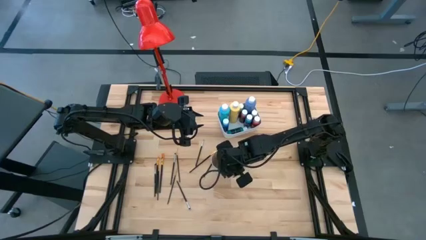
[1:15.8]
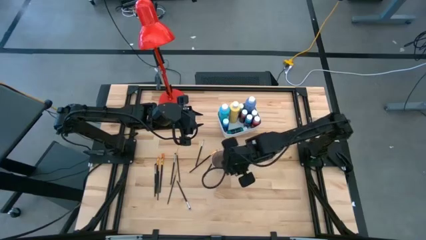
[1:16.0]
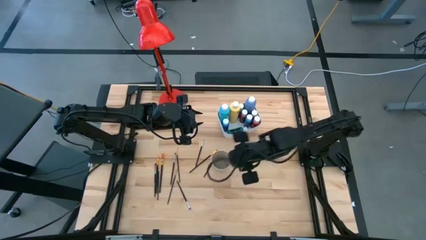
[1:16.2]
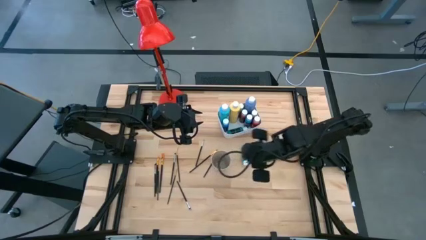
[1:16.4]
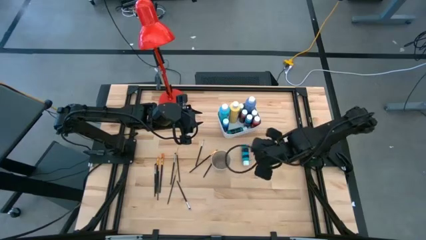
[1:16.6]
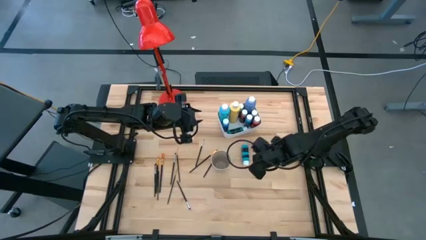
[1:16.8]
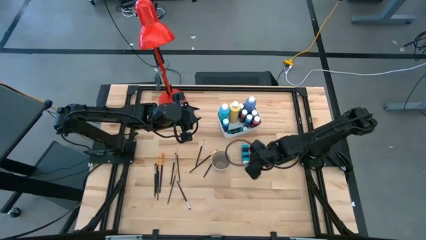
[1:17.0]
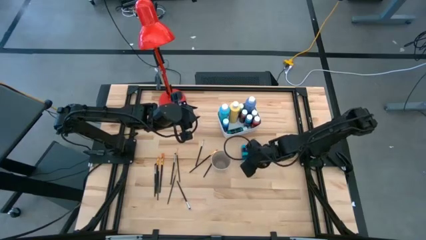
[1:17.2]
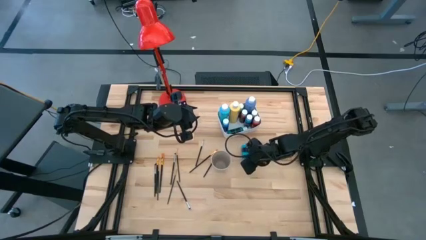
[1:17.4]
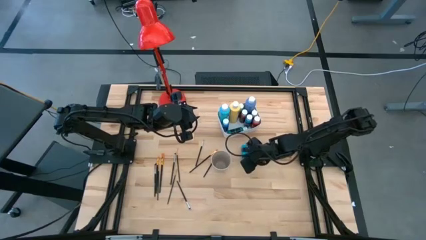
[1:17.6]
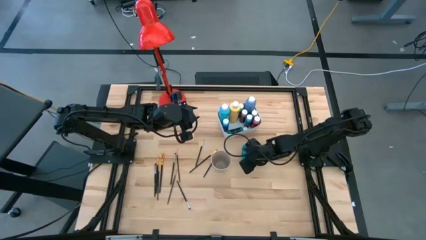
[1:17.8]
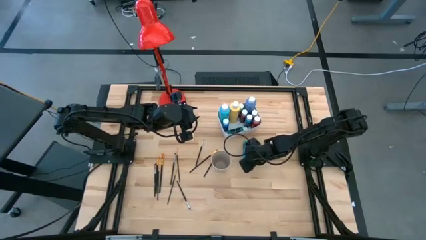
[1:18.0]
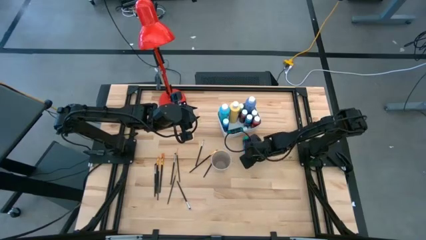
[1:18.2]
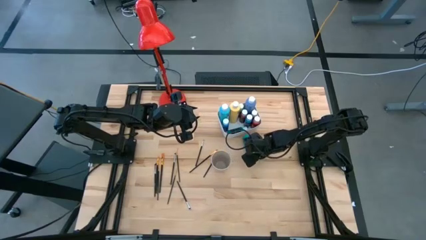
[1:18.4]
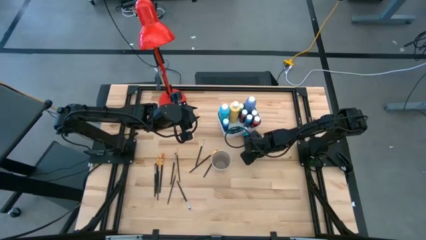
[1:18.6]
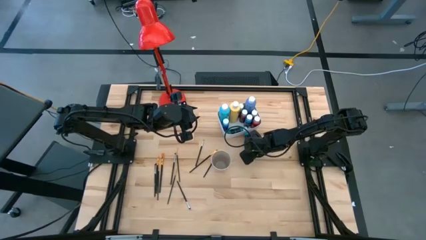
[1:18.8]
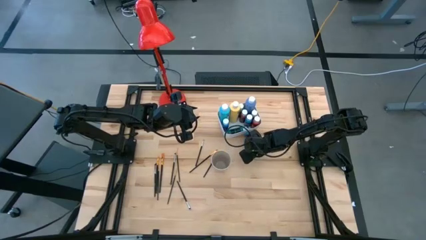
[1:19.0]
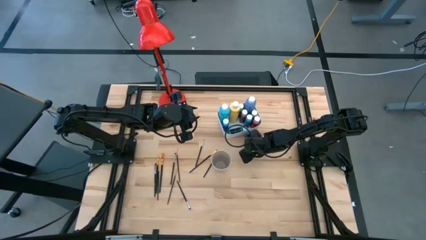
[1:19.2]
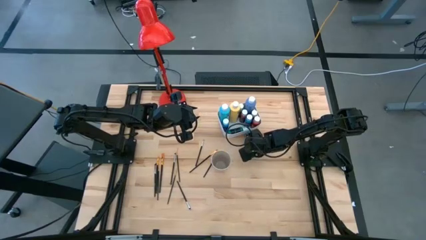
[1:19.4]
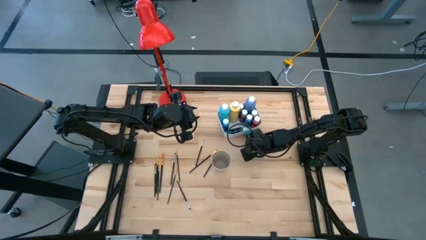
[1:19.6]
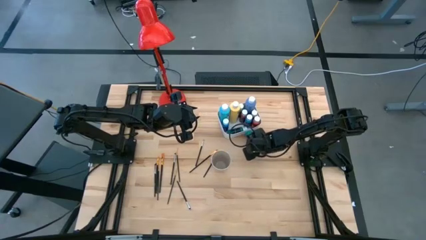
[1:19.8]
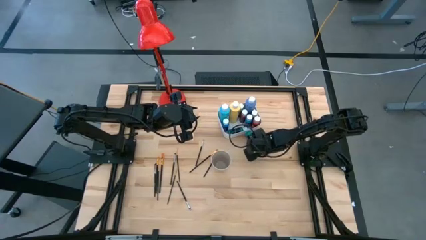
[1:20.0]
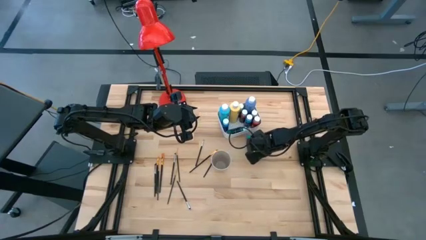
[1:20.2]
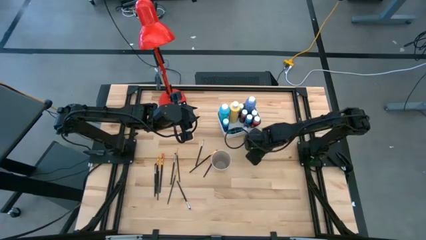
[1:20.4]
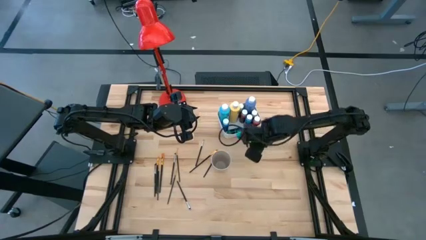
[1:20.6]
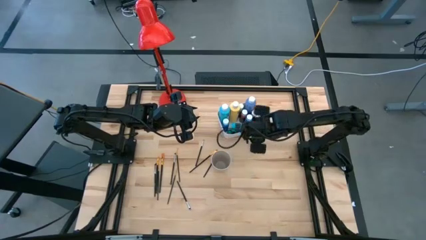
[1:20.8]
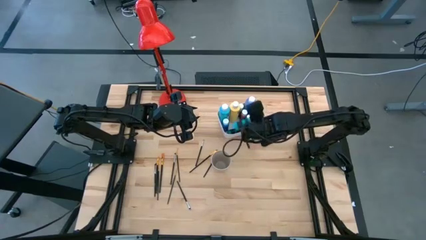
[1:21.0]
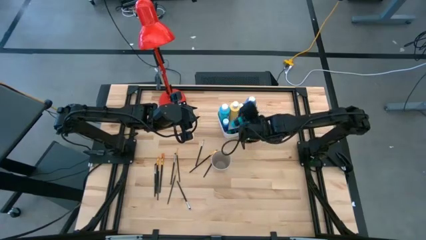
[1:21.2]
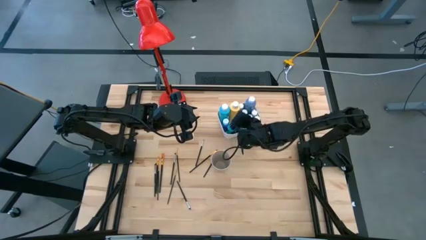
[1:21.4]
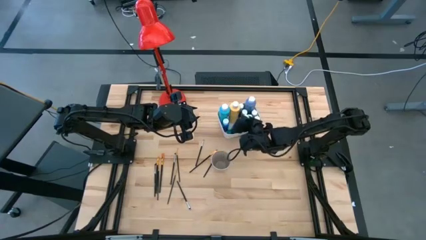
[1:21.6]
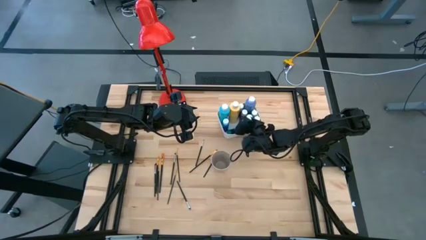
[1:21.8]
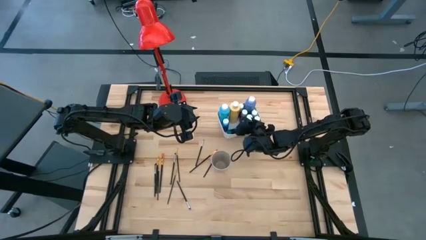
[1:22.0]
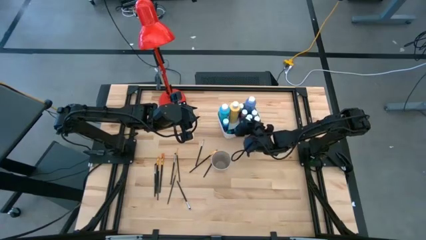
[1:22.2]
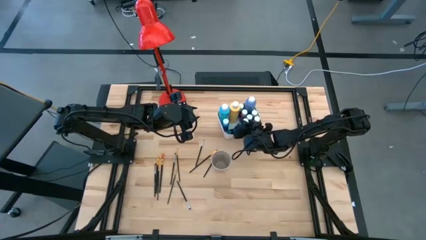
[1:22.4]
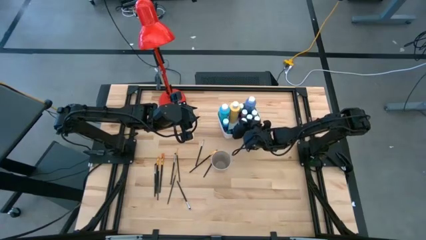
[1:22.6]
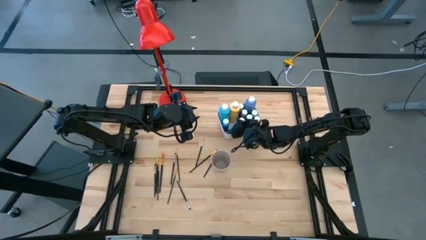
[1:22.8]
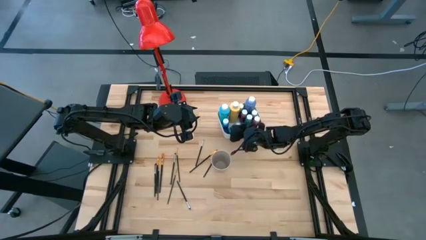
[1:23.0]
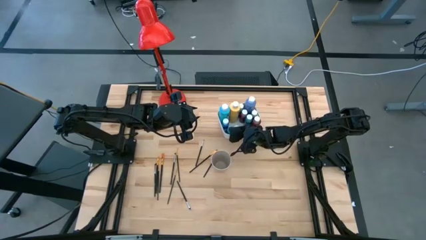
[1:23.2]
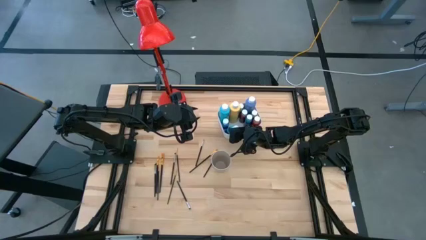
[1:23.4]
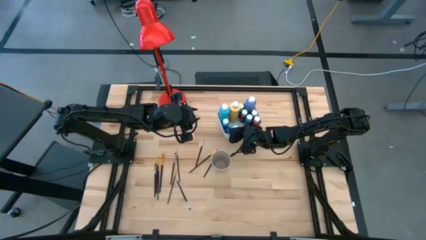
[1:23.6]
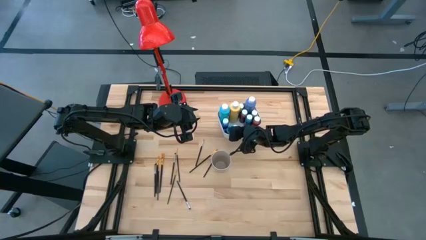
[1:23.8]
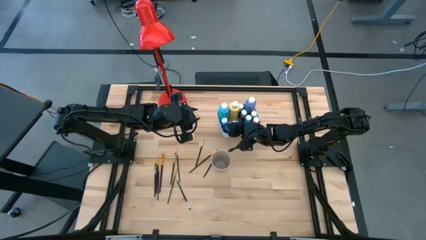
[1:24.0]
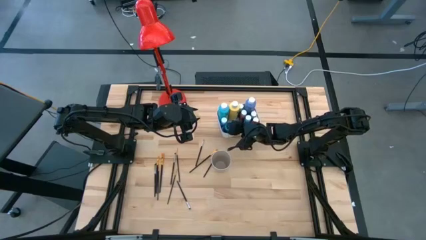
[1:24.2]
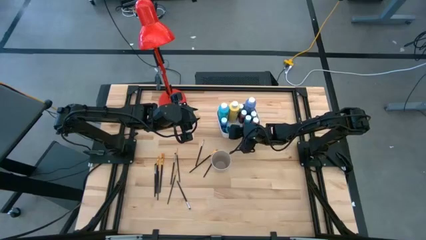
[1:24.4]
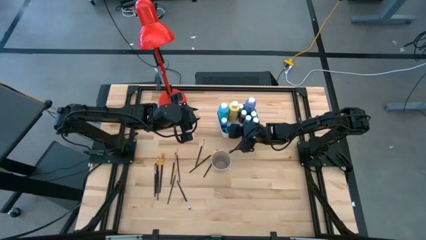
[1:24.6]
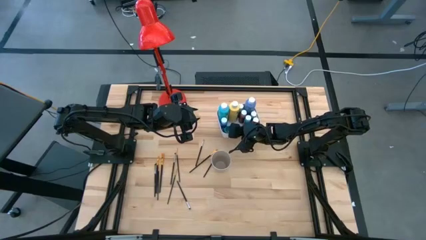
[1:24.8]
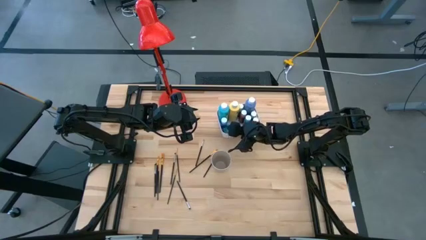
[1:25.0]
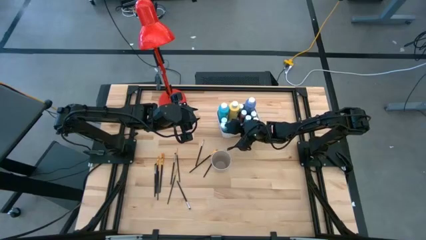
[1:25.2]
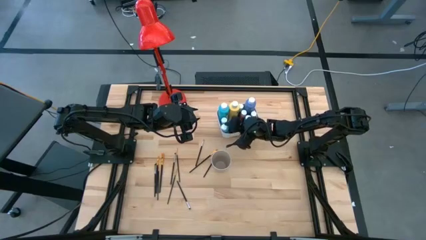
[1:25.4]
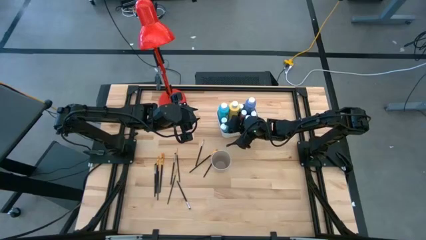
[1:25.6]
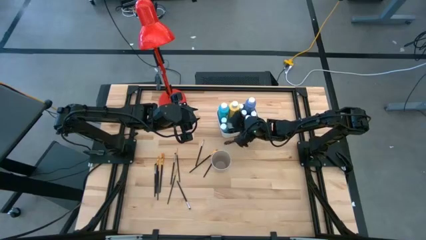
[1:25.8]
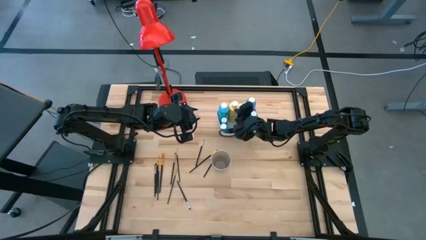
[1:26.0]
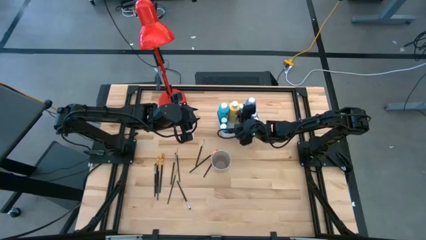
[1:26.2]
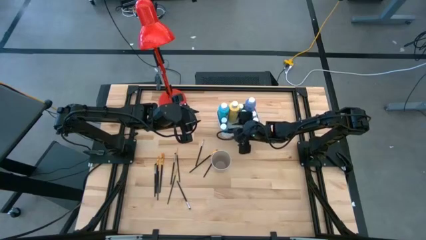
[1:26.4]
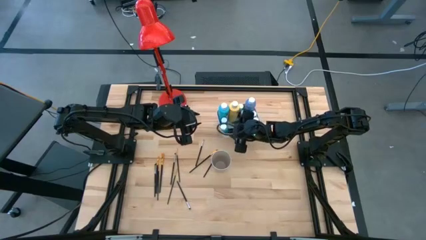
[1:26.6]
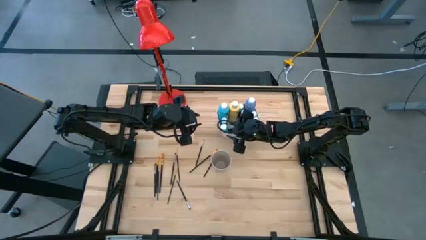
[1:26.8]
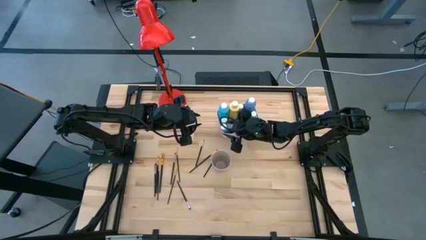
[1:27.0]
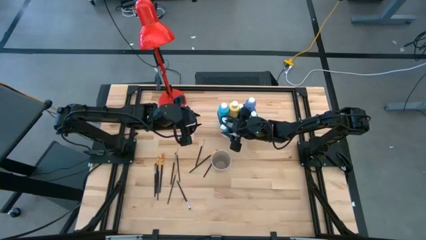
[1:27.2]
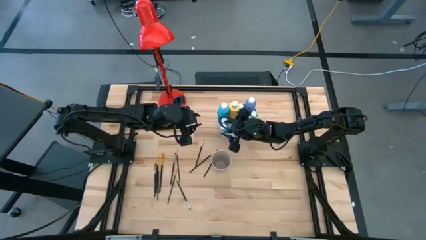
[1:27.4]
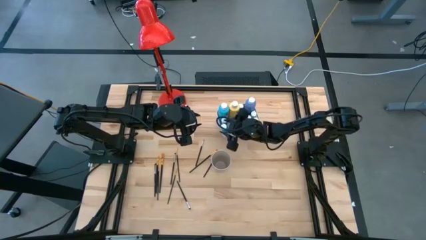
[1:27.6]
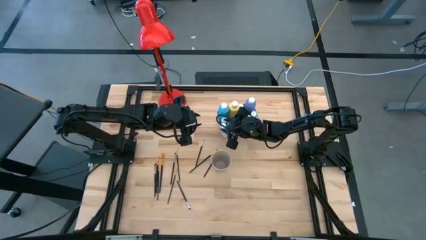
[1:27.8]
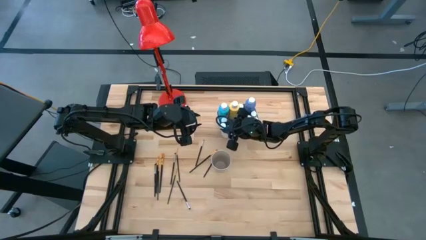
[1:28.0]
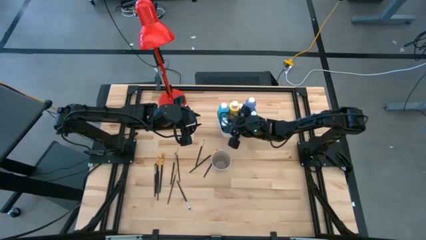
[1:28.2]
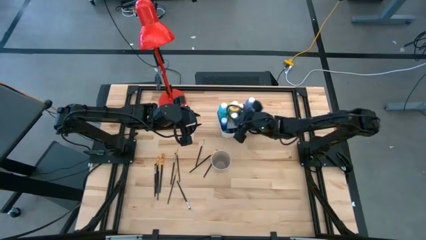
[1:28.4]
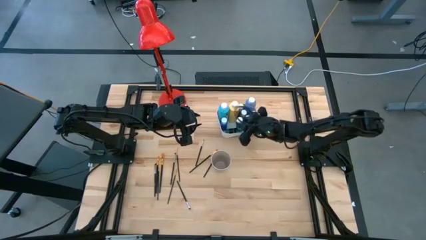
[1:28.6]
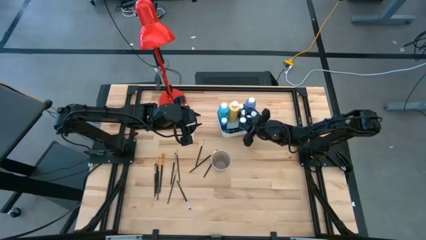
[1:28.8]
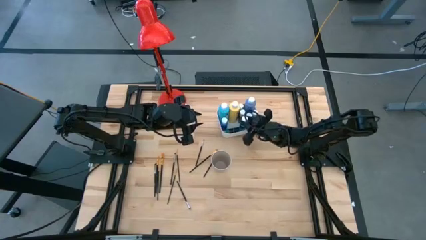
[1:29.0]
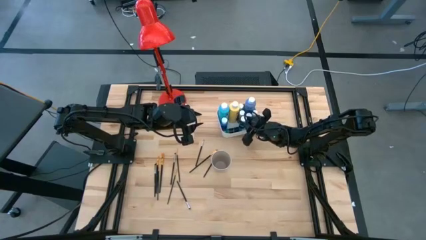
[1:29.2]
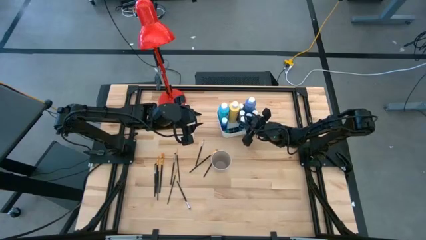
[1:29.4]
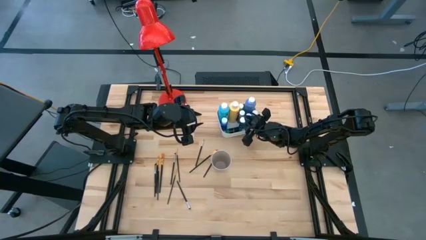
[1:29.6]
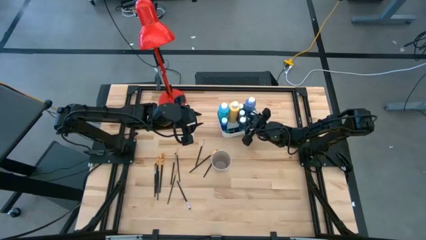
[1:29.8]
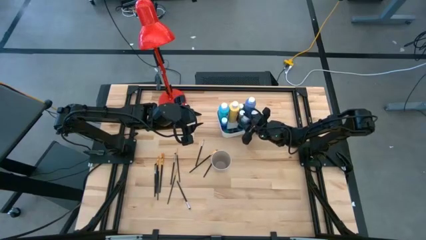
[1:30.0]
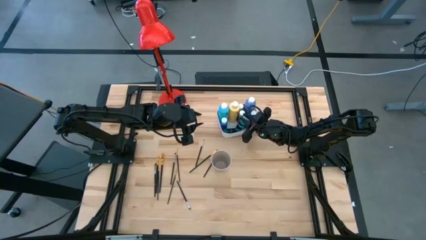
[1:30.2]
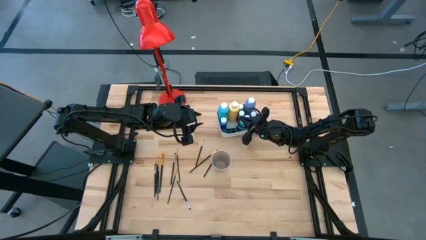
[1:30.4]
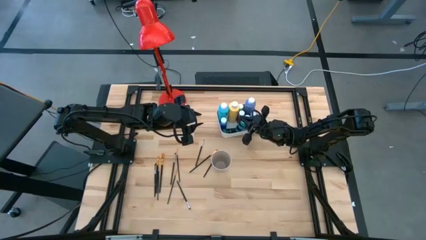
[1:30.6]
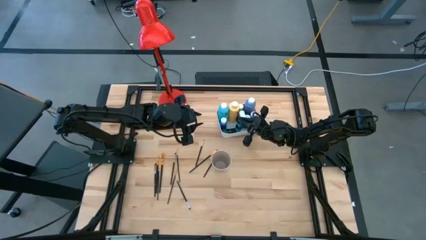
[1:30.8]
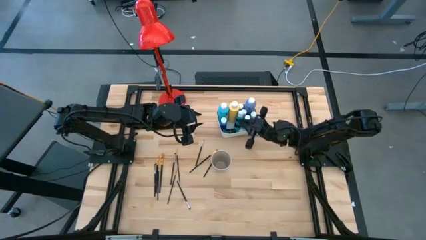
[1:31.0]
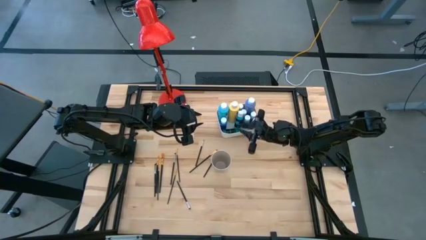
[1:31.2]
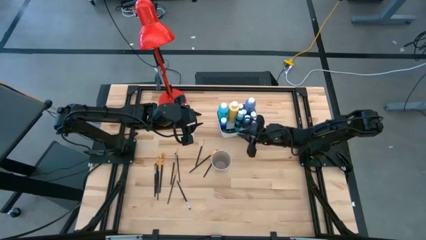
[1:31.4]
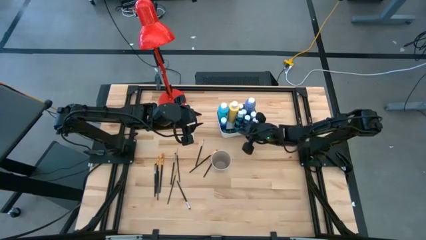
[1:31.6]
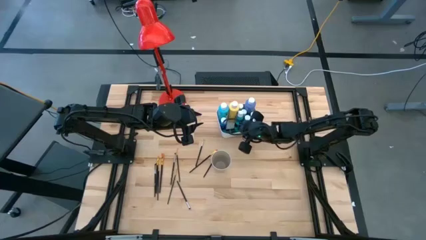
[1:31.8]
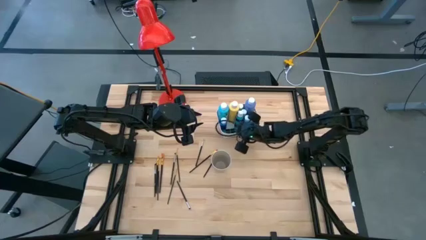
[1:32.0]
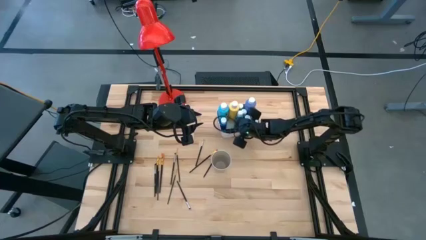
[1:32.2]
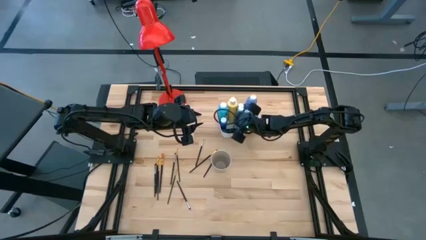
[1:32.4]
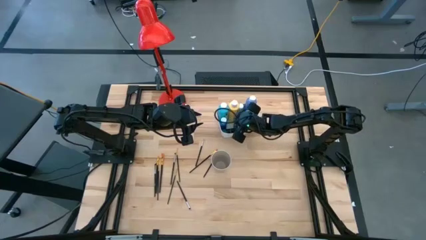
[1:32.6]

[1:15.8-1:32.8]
Task: Pick & Place Paint Supplies
Put the light blue matte acrylic craft paint into the white bin
